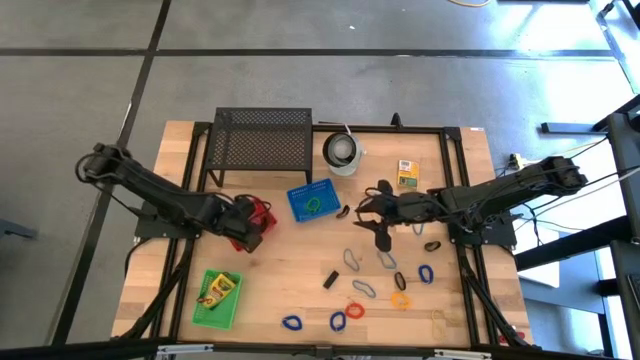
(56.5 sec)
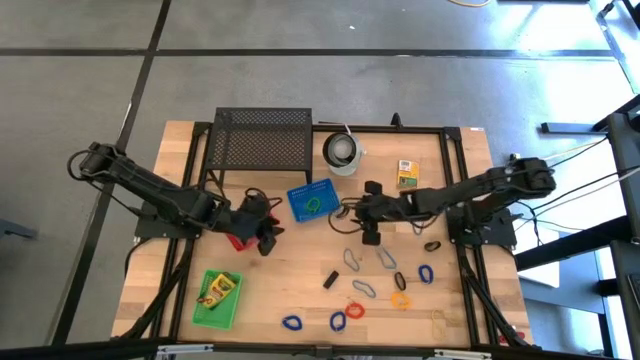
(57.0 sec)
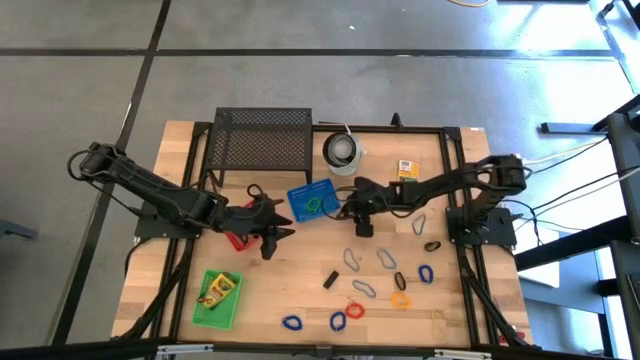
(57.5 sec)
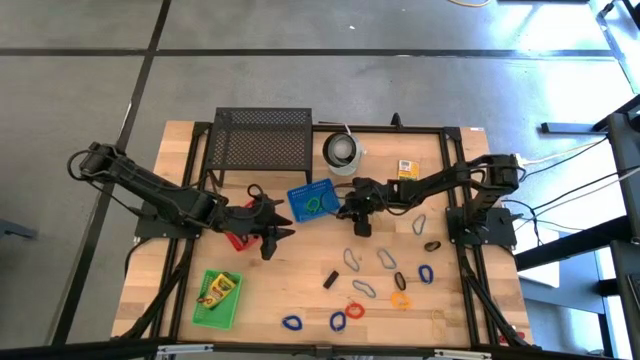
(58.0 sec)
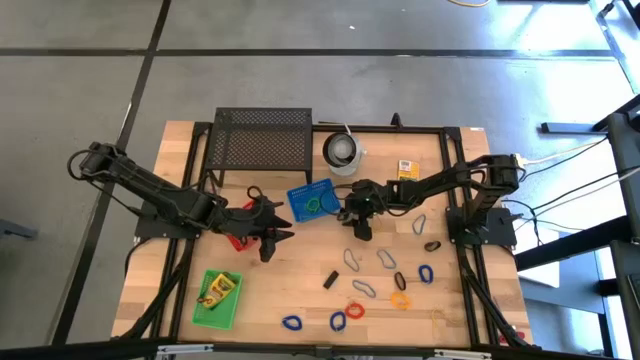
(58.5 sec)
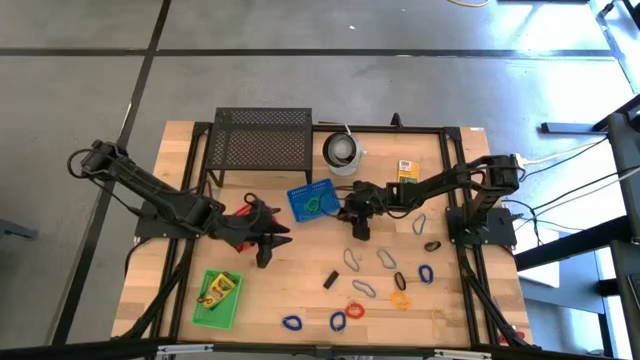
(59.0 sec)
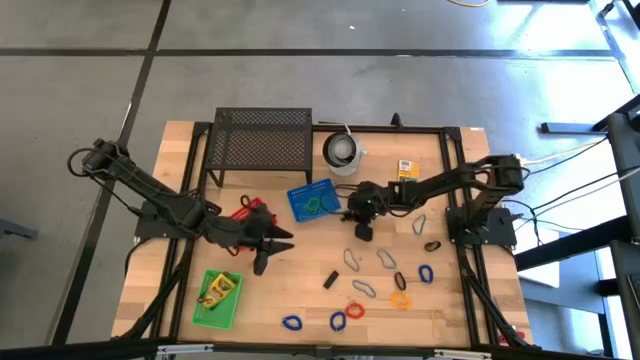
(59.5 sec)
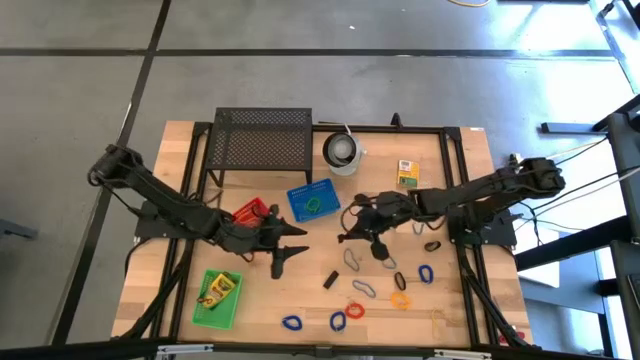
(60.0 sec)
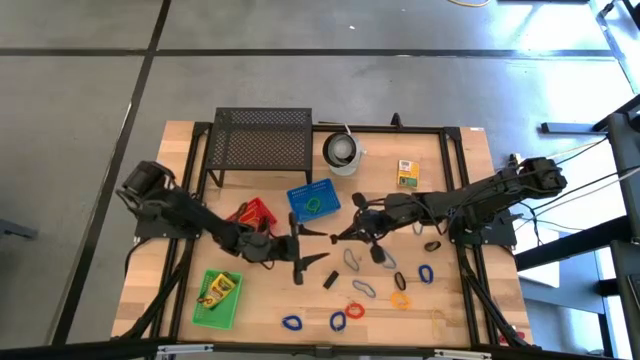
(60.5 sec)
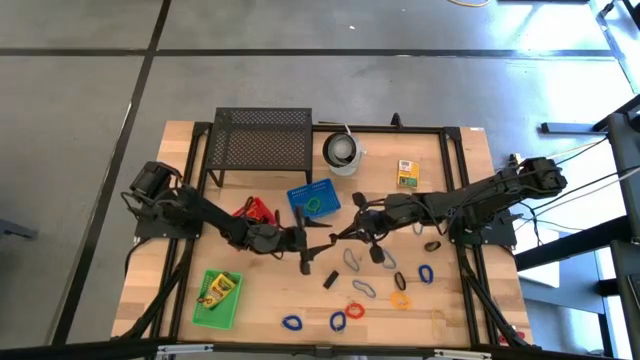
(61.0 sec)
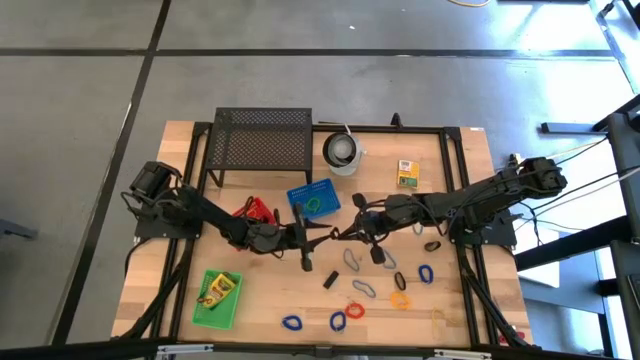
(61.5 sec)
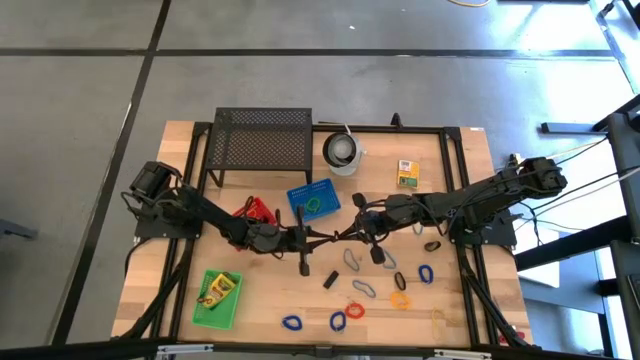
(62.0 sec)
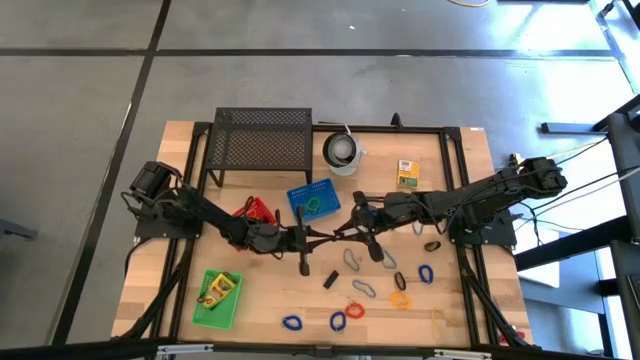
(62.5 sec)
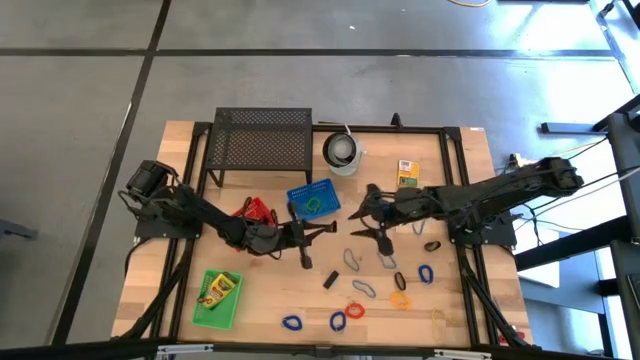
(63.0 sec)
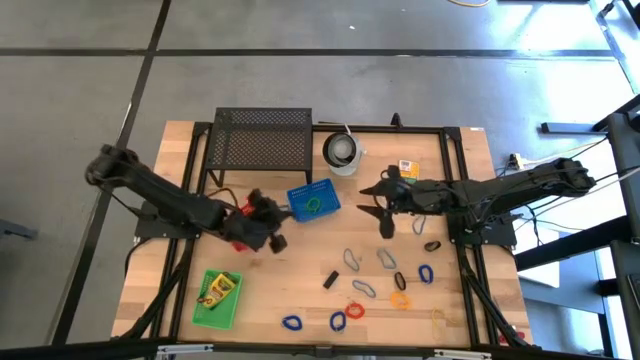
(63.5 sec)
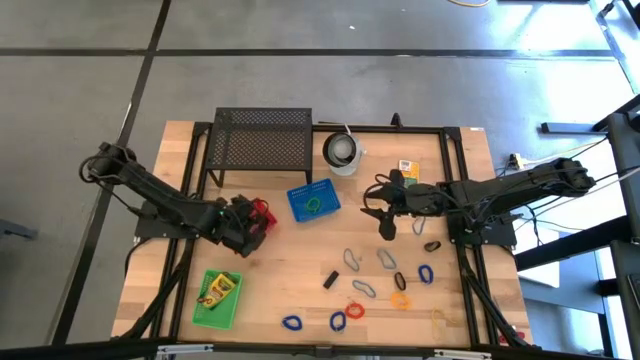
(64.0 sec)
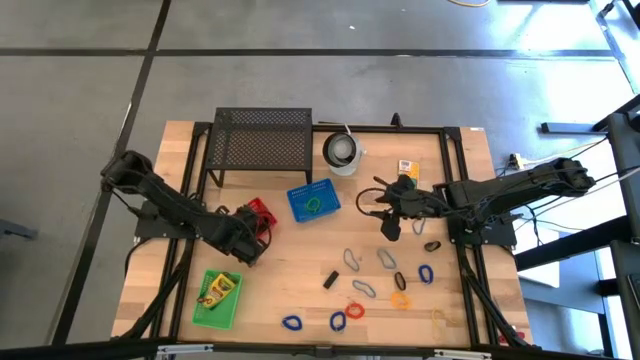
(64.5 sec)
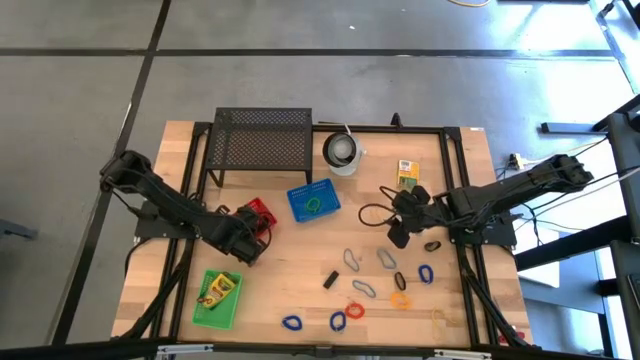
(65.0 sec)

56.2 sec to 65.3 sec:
Task: Pick & Place Office Desk Supplies
Put the black rubber band into the red bin

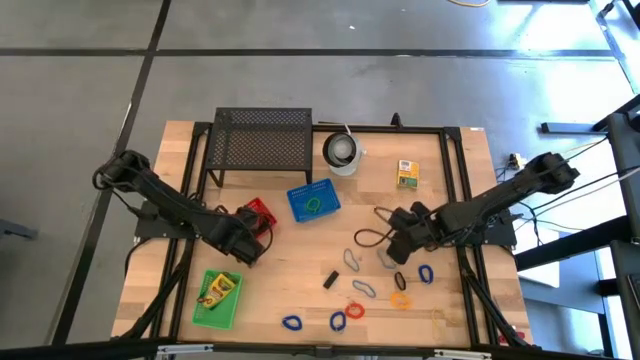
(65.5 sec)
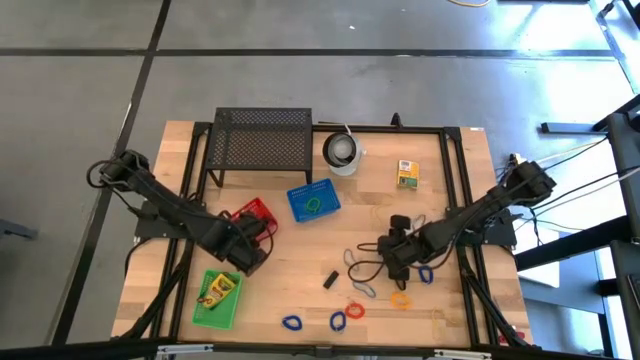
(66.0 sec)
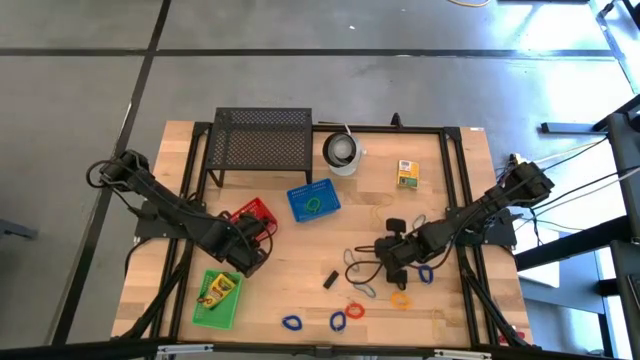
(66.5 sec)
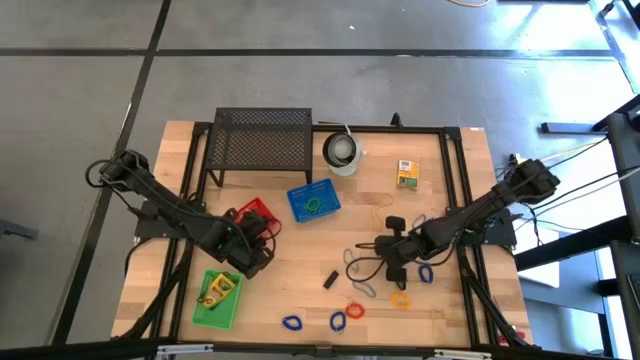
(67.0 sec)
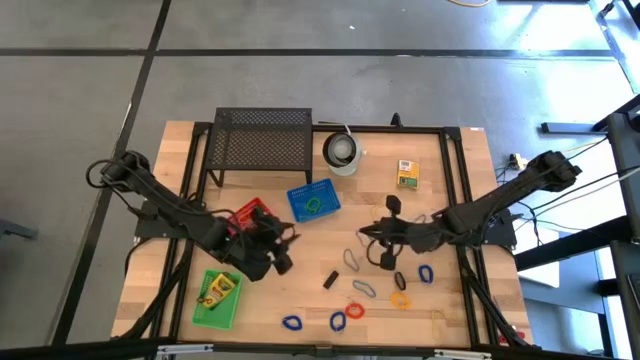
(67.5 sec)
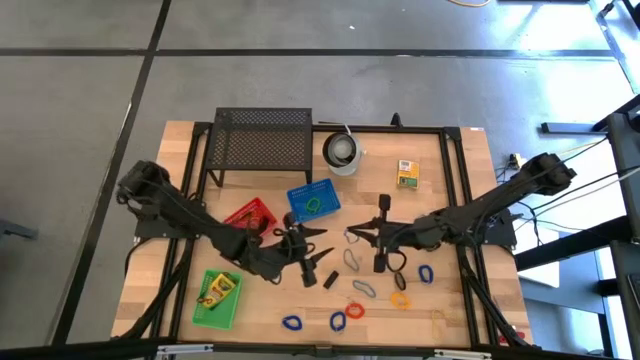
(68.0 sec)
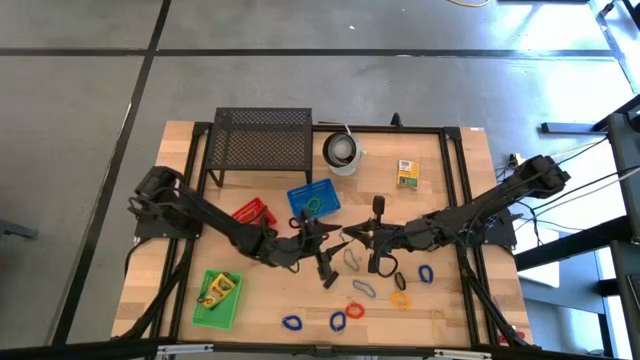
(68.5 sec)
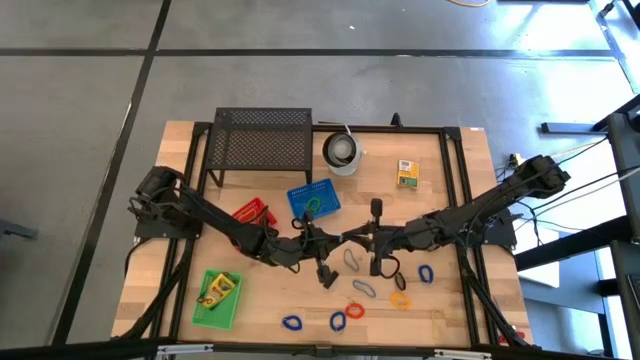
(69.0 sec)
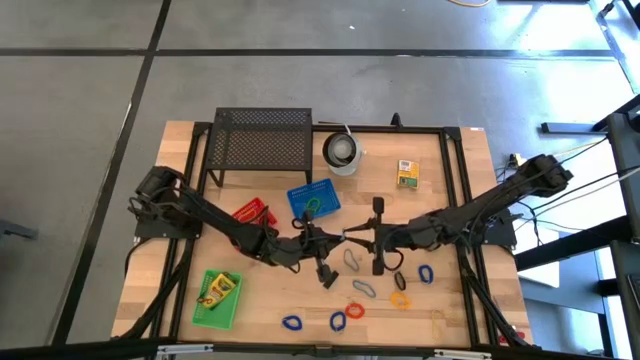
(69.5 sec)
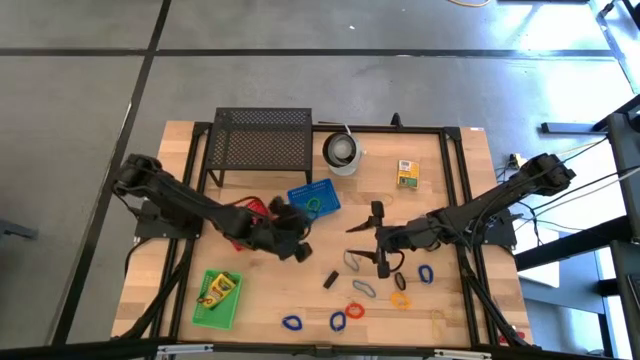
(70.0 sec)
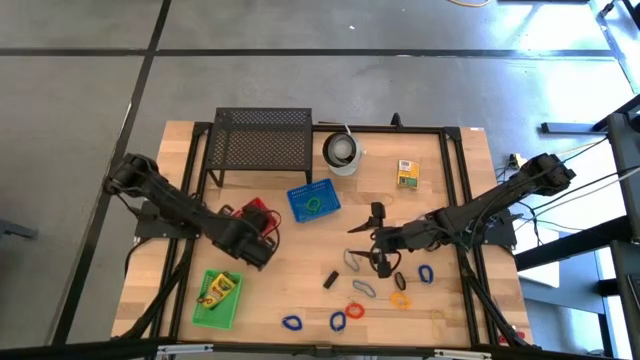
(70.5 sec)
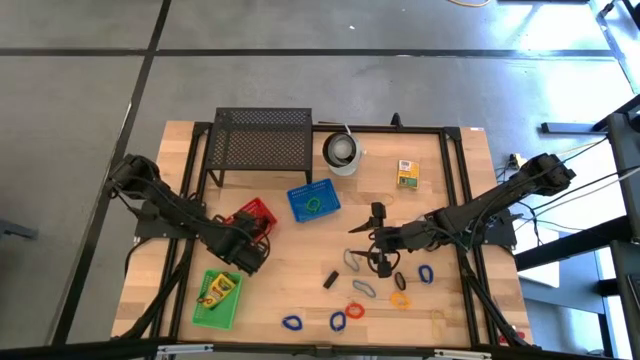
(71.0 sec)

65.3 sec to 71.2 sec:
Put the blue rubber band into the red bin

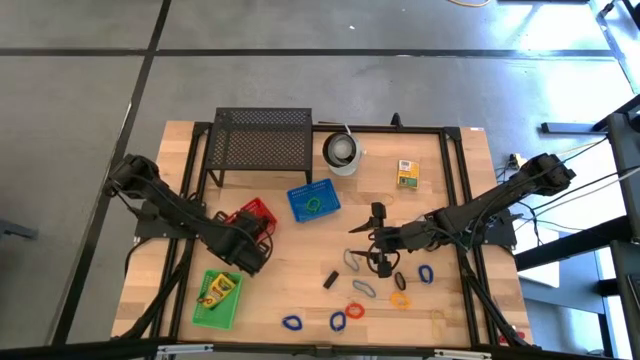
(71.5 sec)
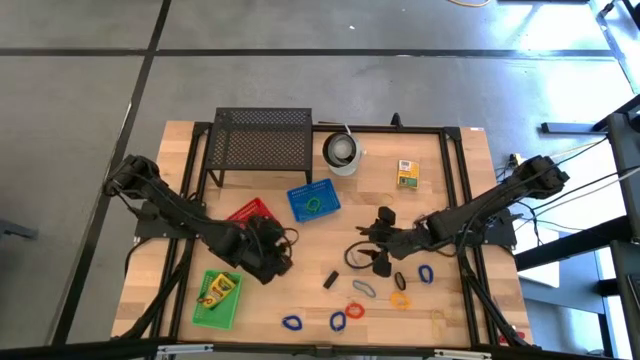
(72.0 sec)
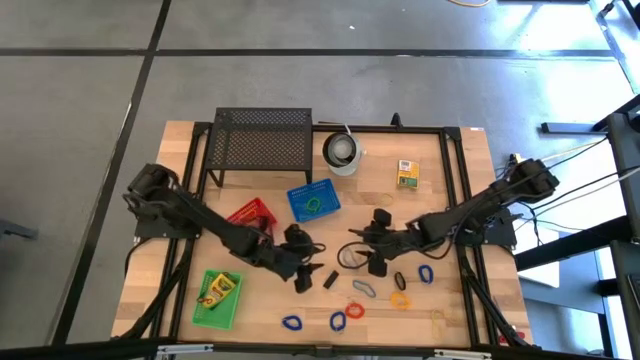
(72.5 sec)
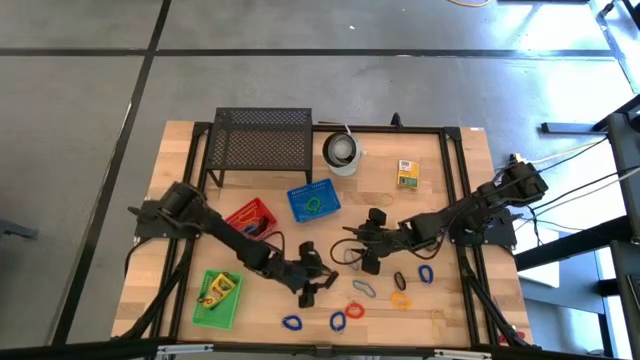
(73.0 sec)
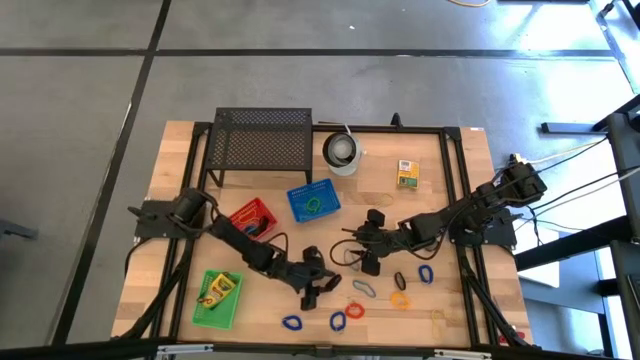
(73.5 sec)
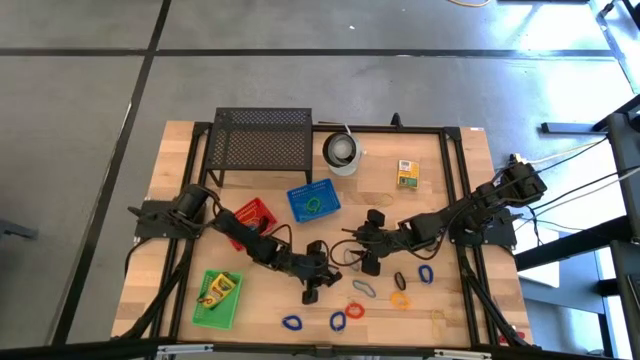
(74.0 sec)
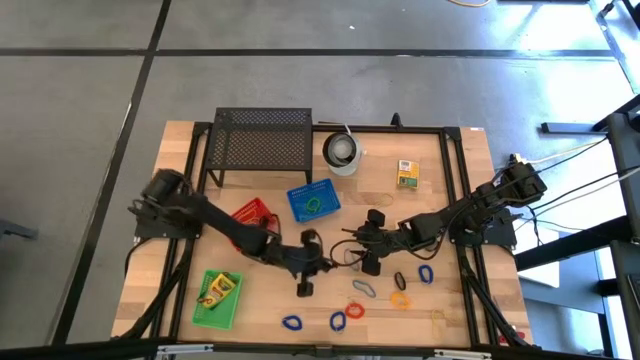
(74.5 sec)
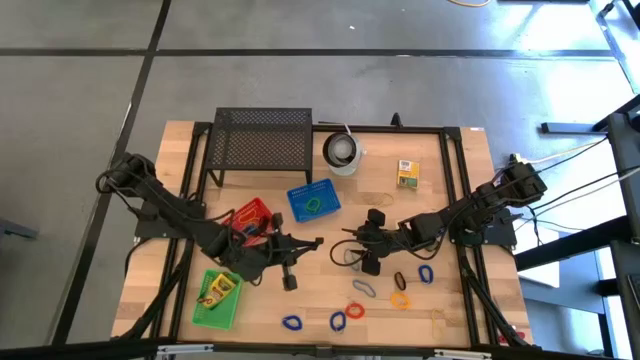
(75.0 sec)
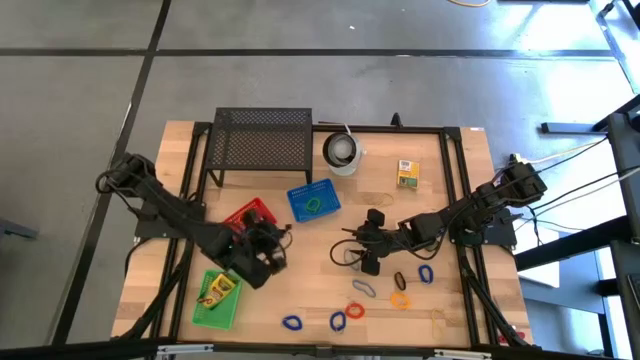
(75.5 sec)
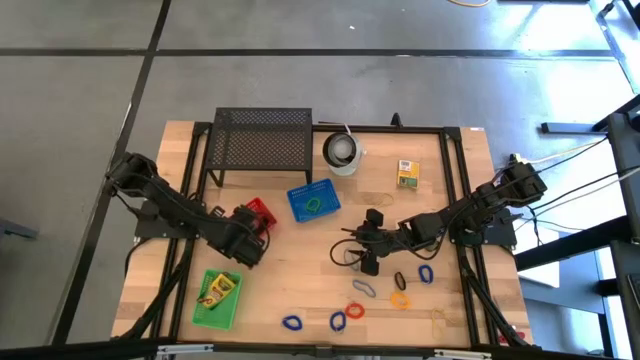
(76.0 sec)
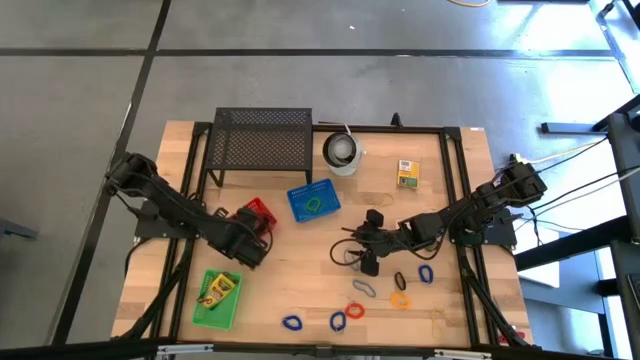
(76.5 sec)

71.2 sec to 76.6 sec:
Put the black rubber band into the red bin

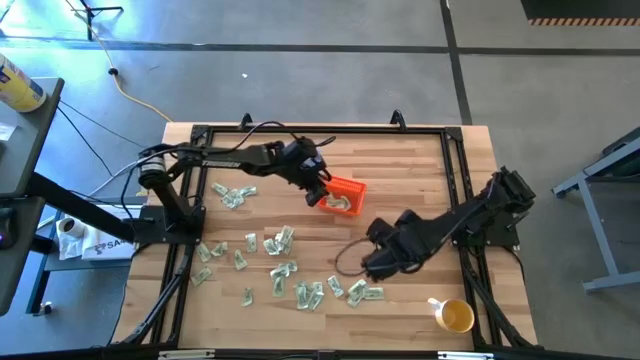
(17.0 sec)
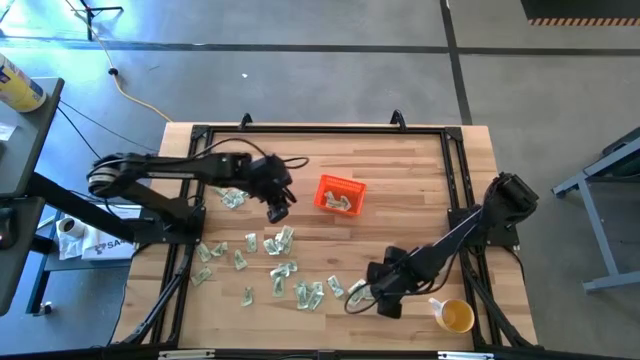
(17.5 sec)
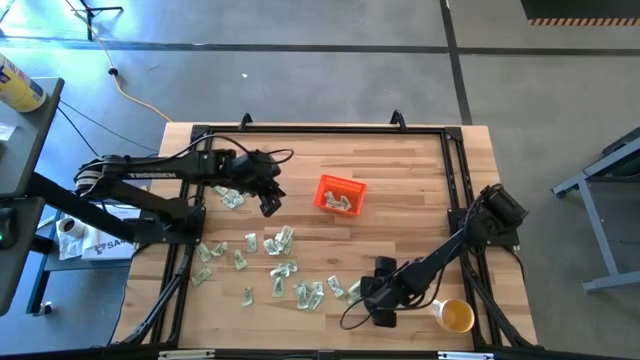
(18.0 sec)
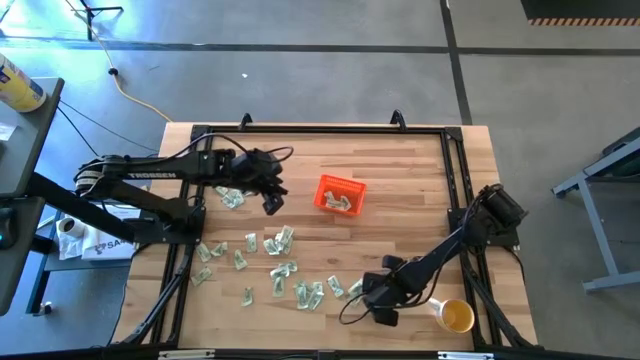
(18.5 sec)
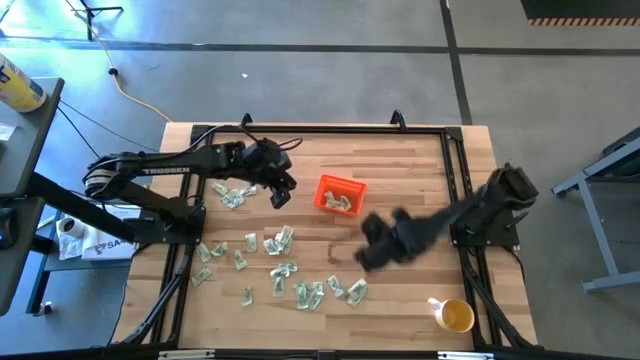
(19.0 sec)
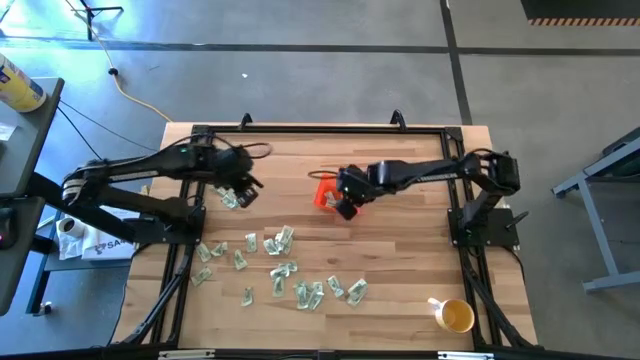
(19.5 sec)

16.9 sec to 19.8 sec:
Task: Pick and place Stevia / Truvia into bins
Put the green stevia packet into the orange basket
